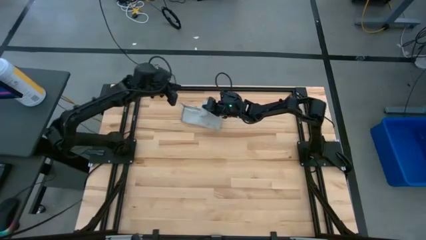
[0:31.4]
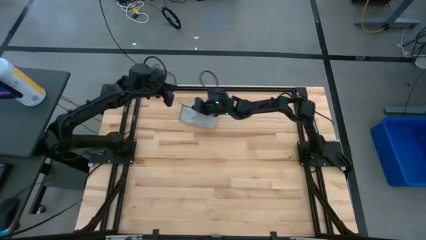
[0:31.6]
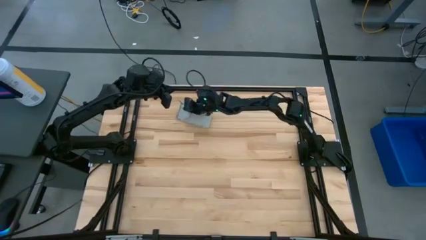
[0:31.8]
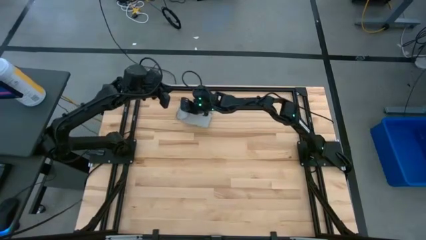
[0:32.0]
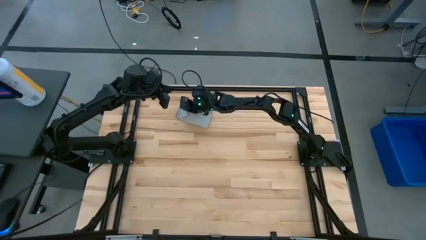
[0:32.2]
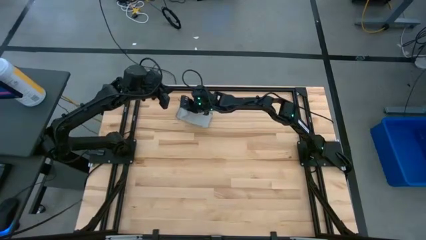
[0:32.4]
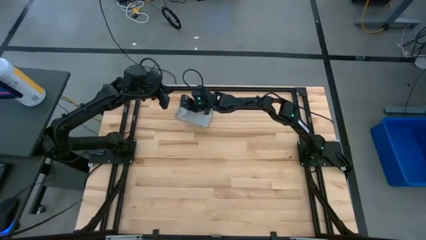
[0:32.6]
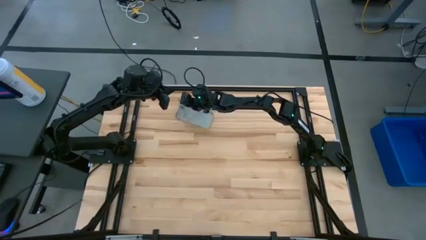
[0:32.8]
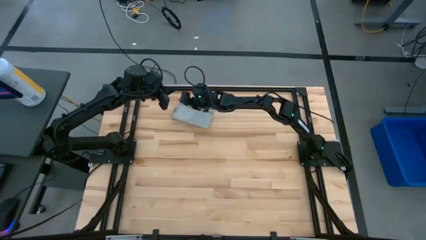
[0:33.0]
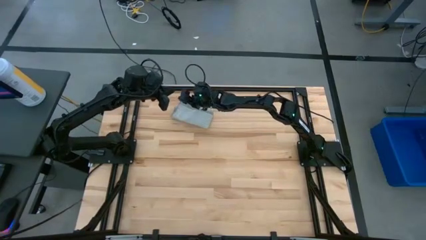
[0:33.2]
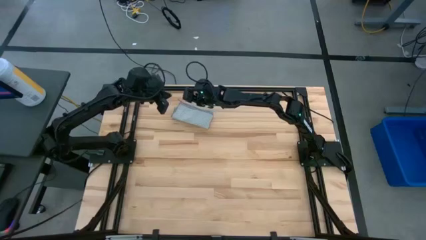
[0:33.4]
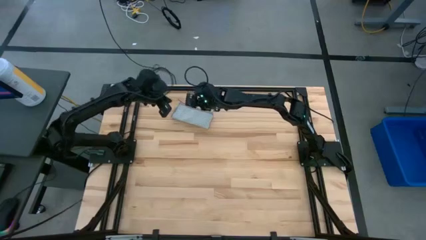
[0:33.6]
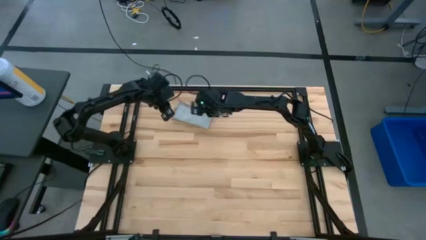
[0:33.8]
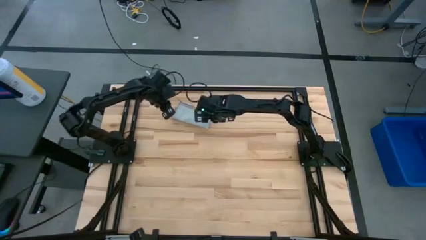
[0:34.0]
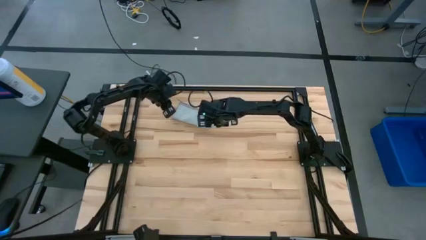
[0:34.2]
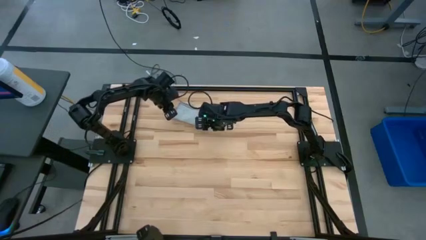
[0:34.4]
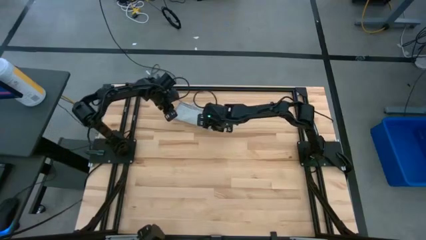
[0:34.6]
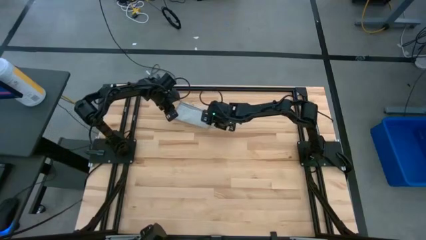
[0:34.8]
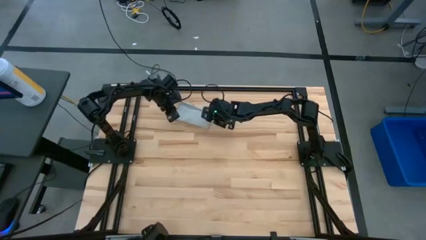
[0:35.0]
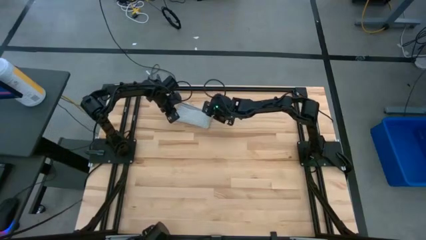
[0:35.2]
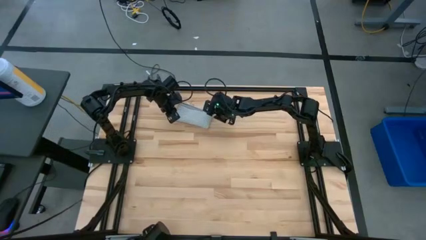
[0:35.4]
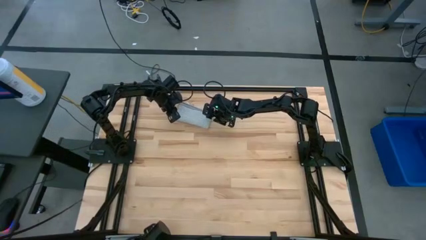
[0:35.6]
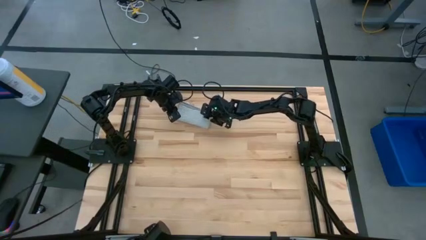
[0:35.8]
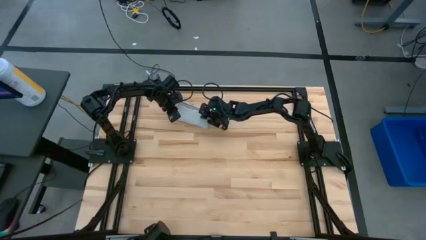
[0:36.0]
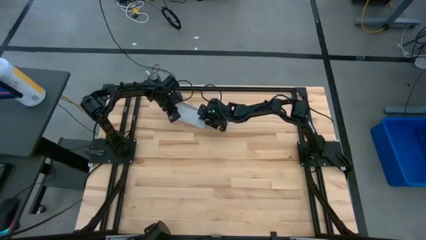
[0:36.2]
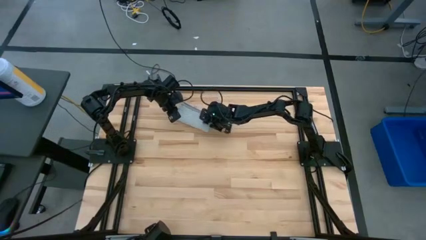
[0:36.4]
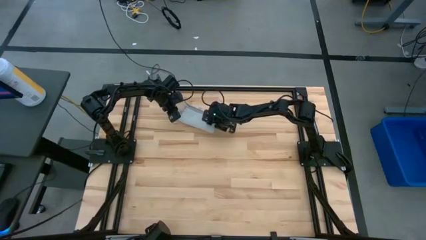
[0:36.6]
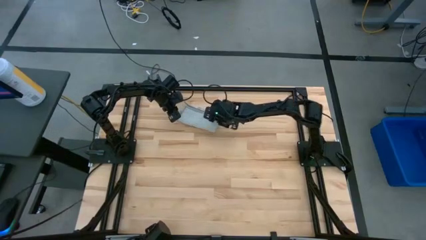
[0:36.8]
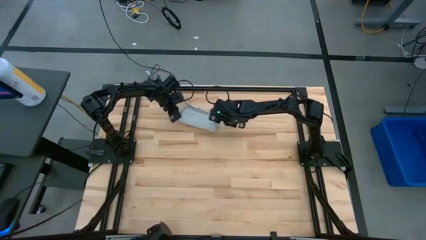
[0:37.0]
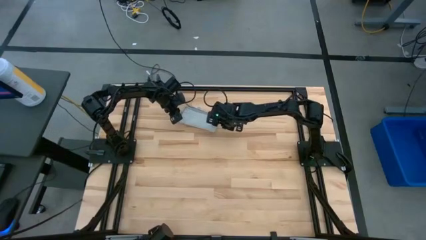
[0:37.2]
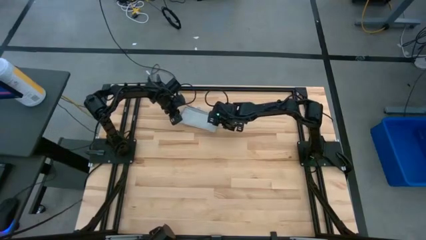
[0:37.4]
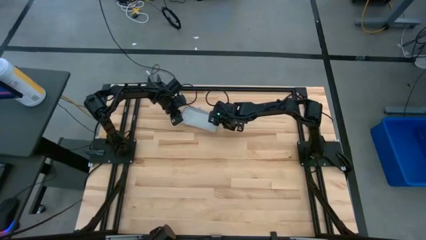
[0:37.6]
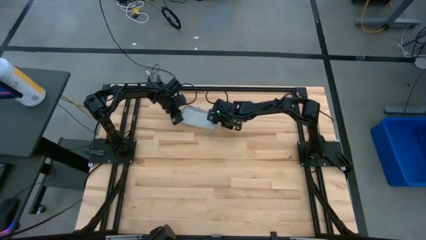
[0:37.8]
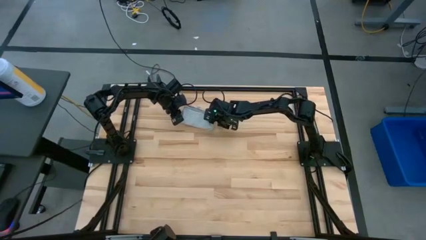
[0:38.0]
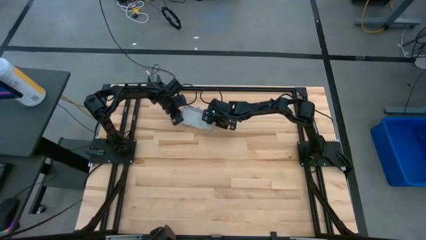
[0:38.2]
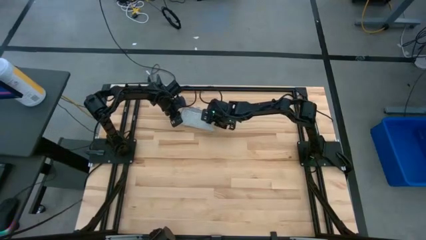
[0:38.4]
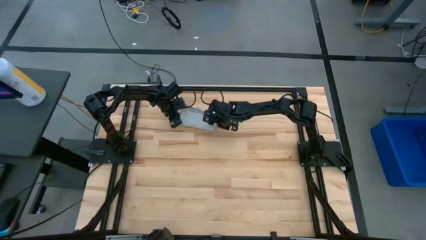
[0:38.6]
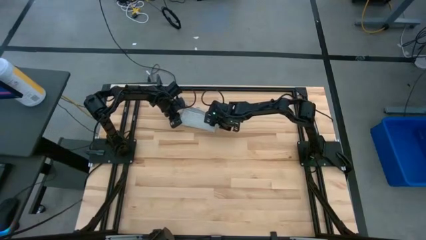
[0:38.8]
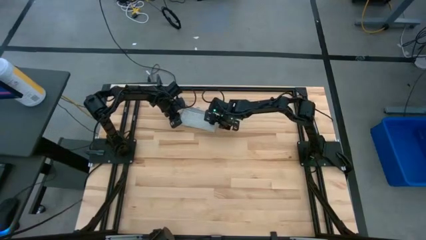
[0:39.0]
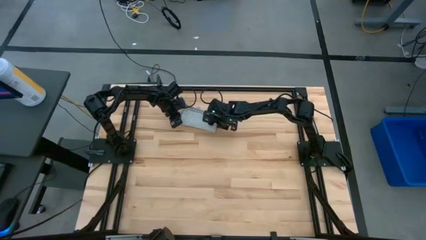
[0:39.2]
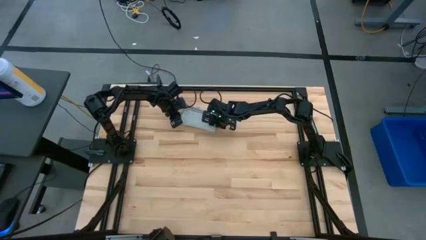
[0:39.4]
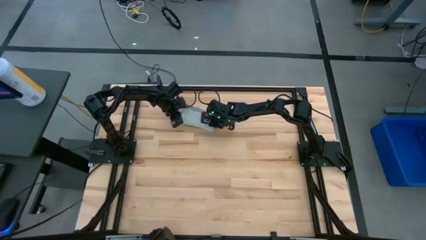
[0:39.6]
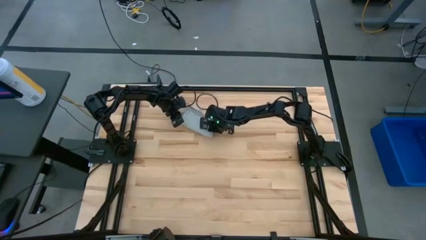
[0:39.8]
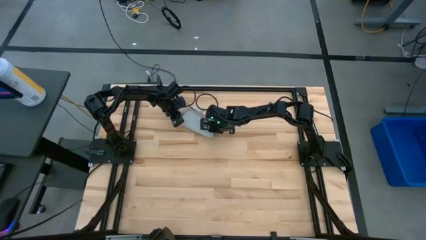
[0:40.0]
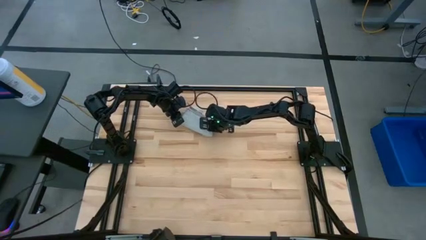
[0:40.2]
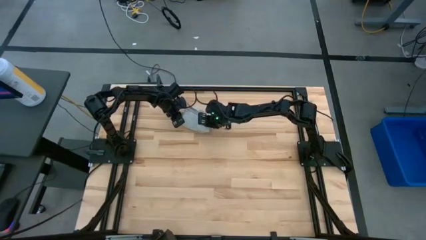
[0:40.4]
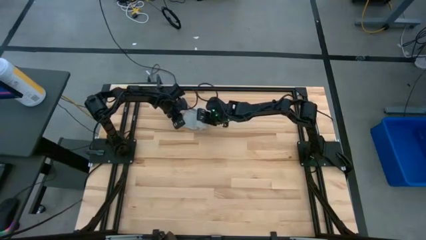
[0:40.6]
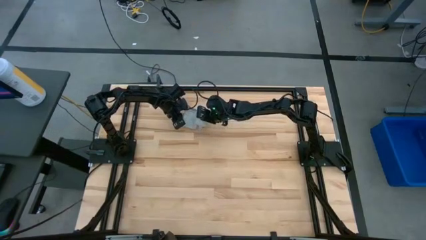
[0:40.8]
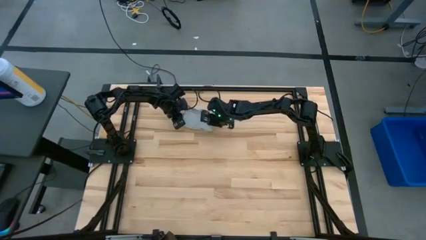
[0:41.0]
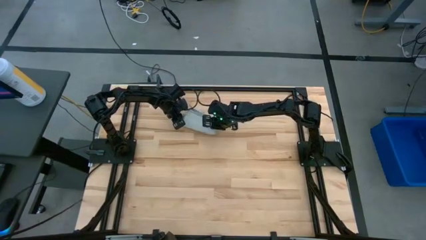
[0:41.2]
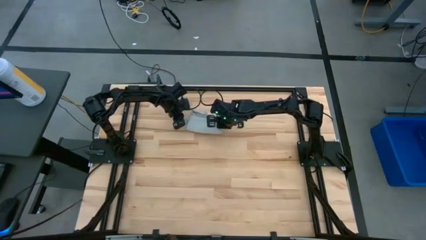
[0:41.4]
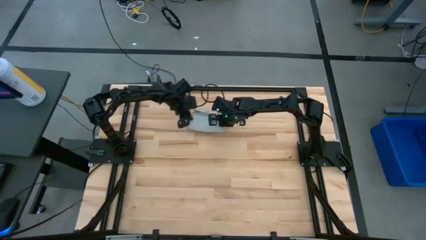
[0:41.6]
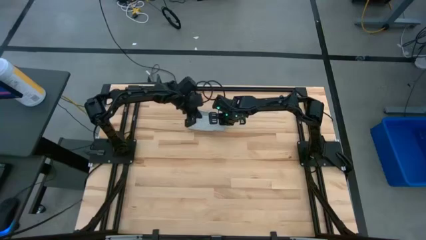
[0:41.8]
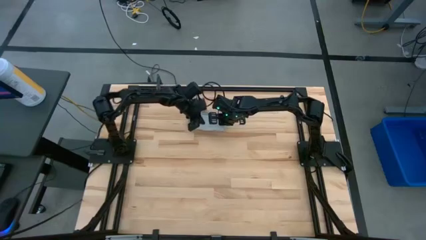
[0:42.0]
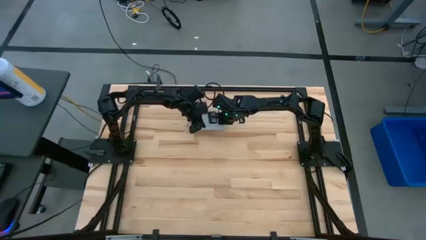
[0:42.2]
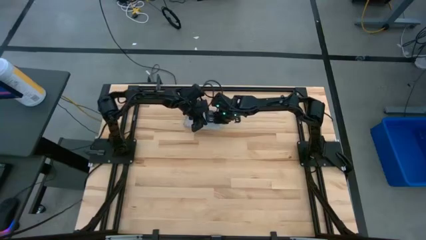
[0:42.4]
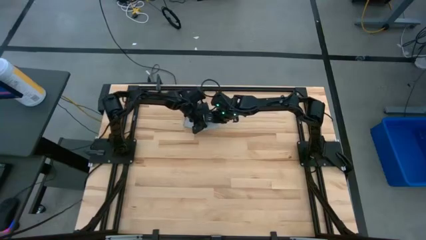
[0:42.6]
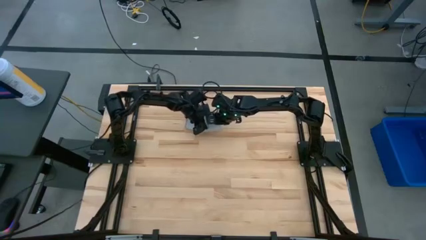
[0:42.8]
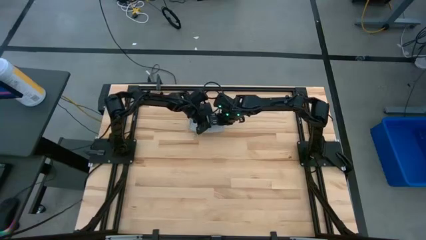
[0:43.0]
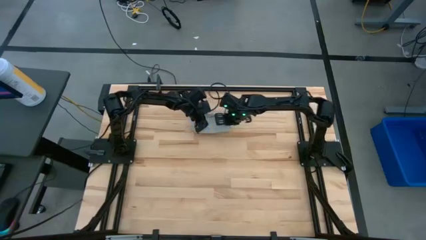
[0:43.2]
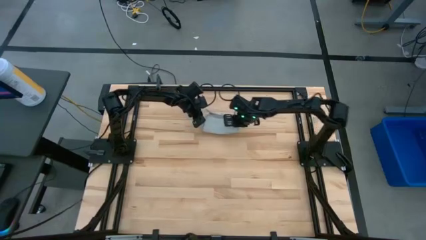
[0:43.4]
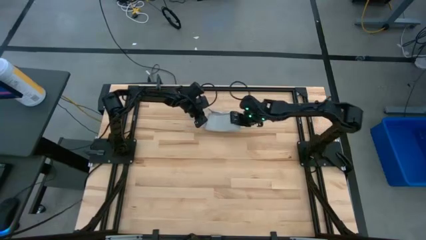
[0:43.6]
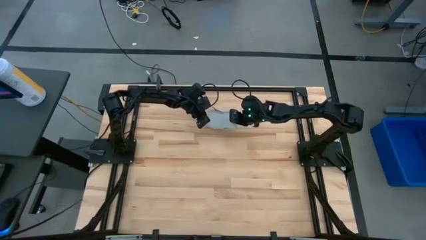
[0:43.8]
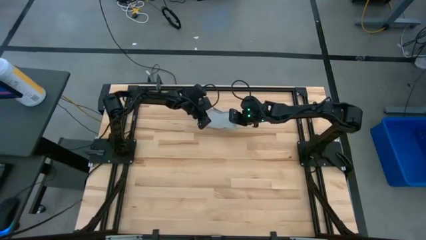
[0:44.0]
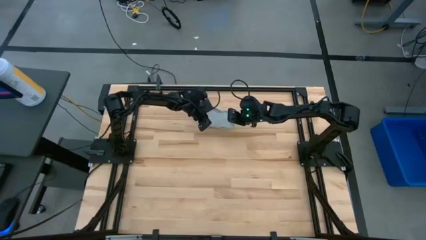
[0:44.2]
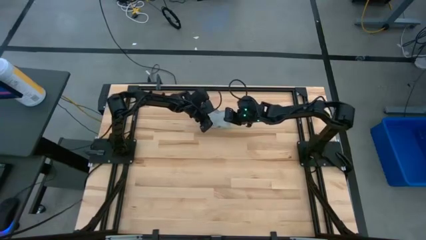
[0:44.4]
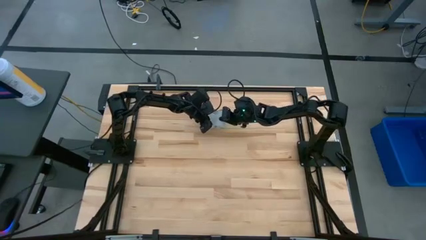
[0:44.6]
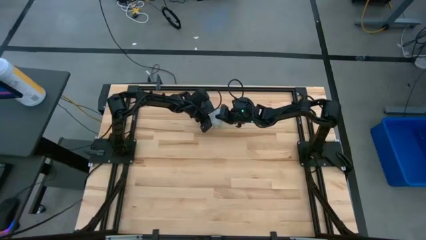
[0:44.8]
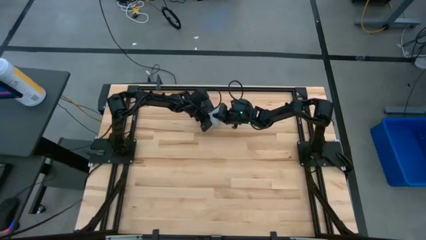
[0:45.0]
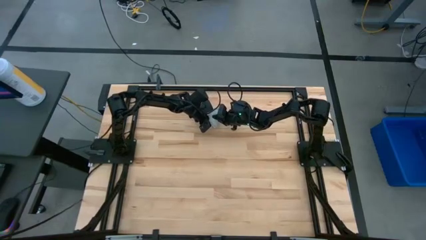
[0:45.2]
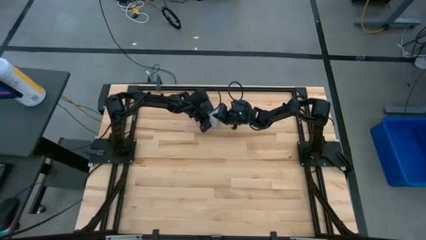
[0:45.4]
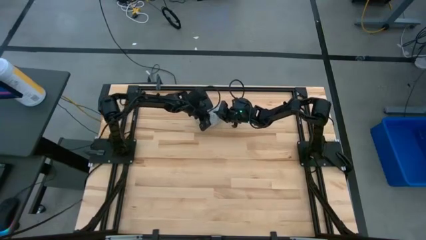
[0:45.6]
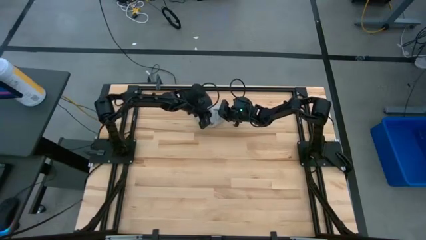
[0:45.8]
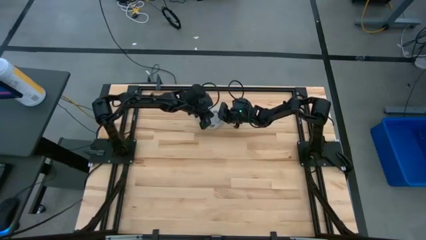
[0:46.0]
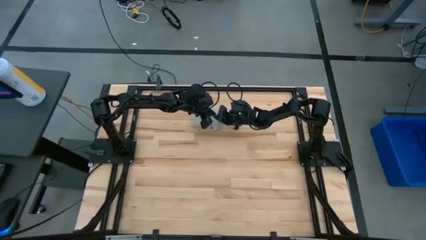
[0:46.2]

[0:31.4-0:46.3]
Task: Fold microfiber towels
Fold the gray microfiber cloth
